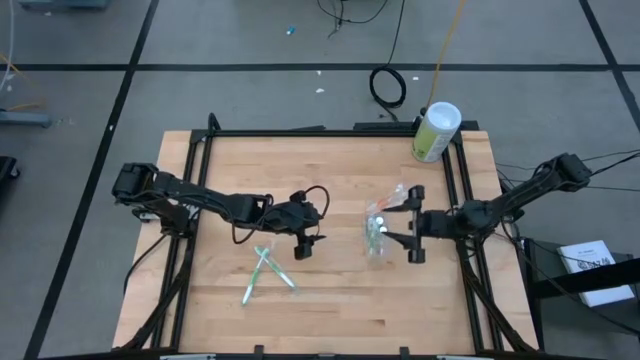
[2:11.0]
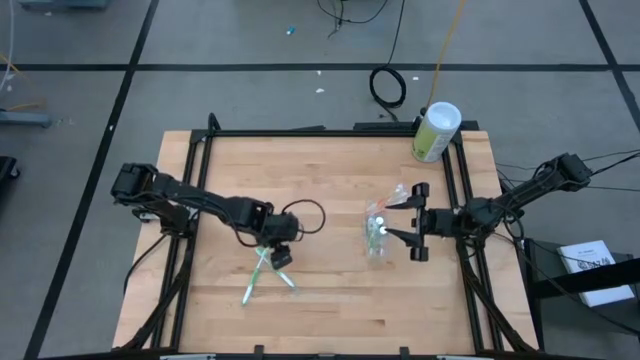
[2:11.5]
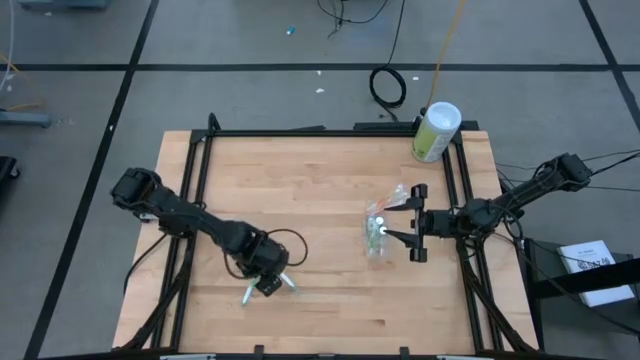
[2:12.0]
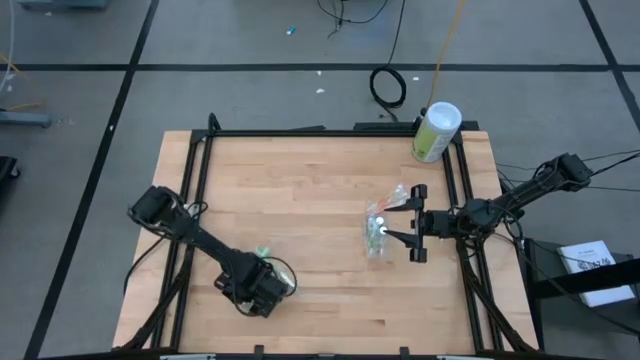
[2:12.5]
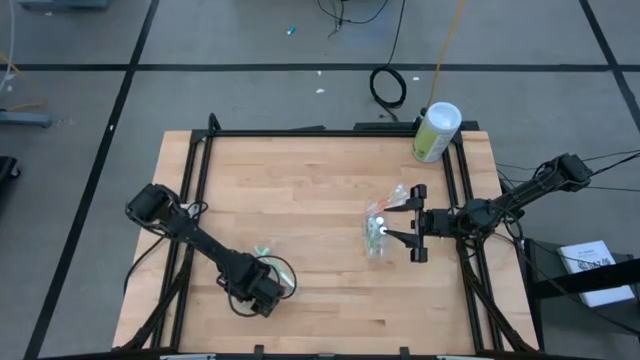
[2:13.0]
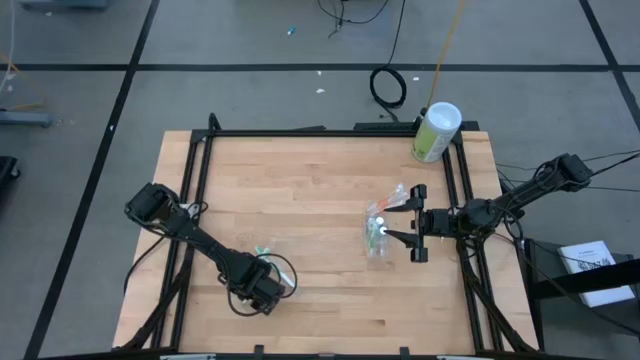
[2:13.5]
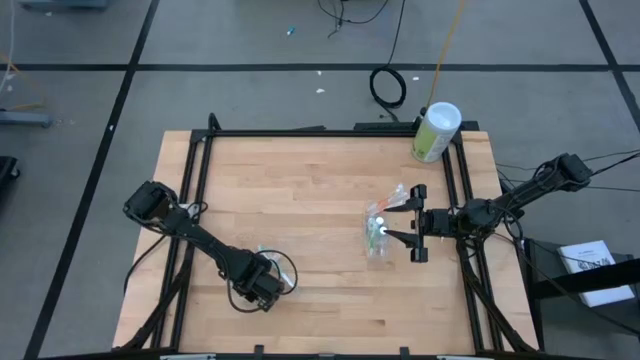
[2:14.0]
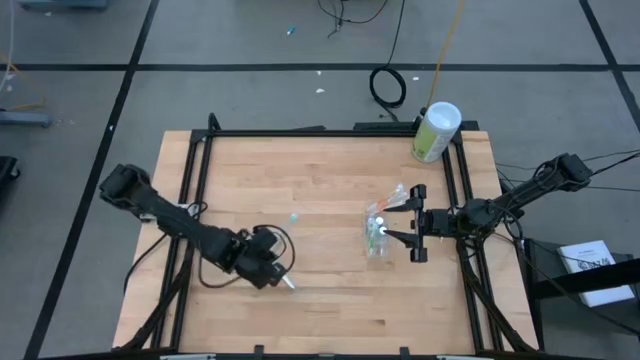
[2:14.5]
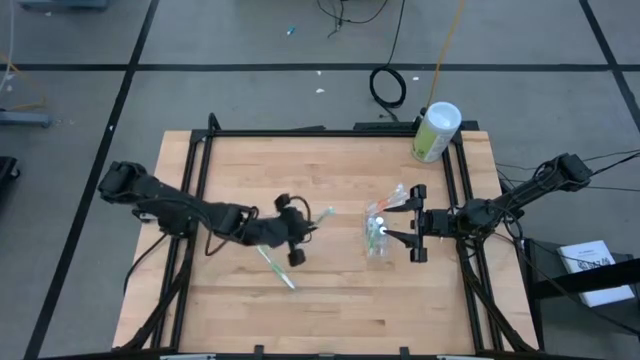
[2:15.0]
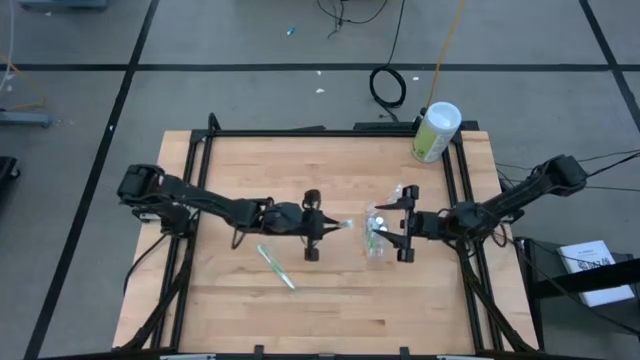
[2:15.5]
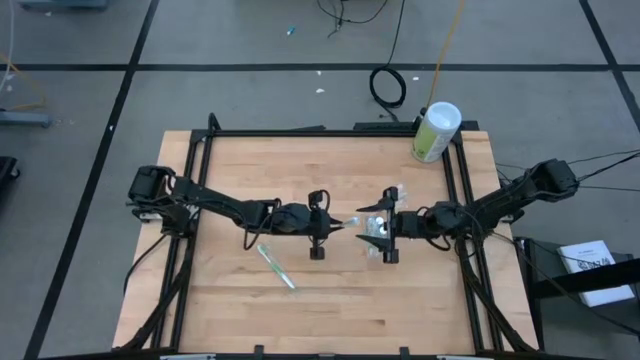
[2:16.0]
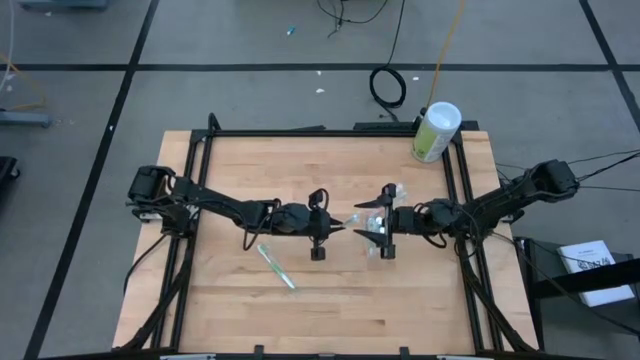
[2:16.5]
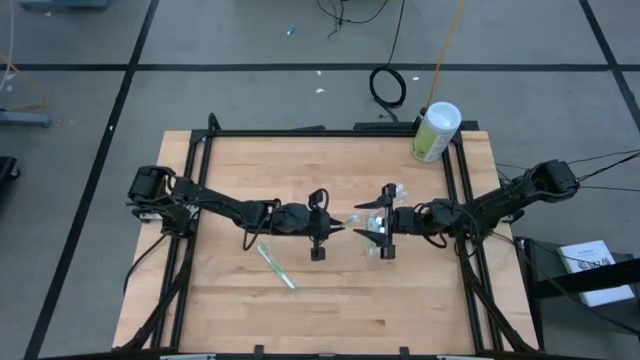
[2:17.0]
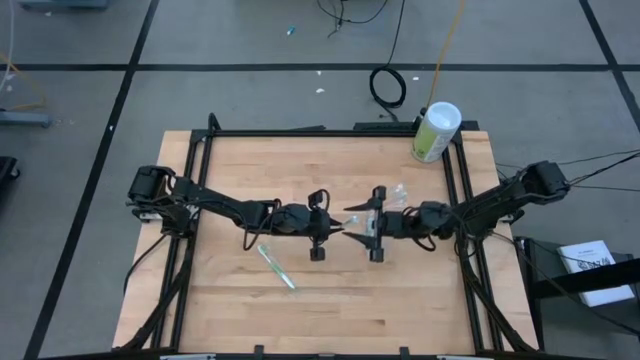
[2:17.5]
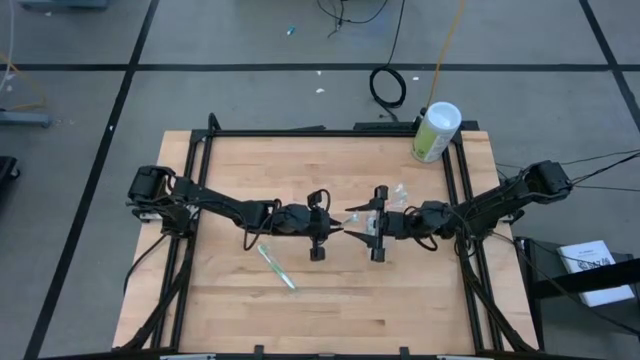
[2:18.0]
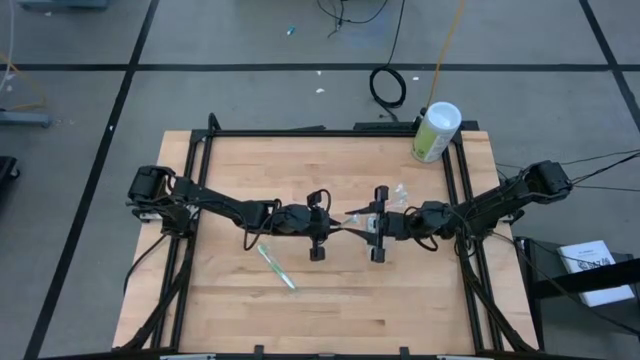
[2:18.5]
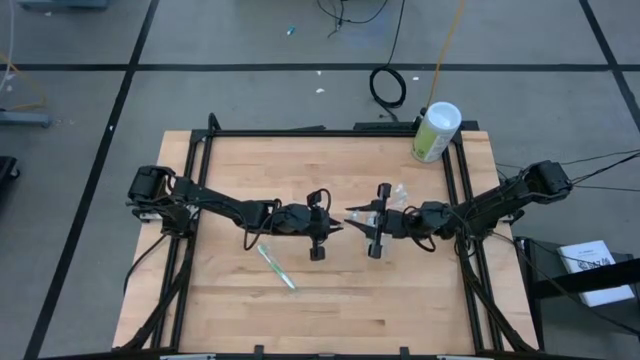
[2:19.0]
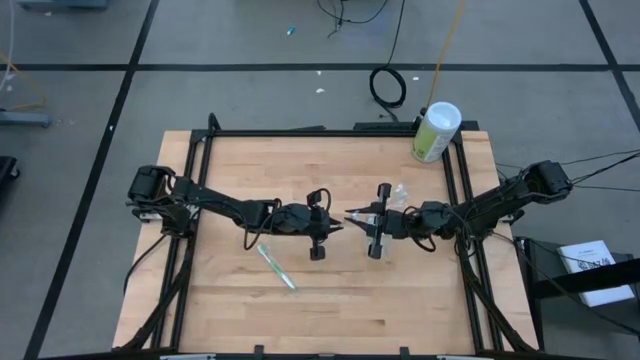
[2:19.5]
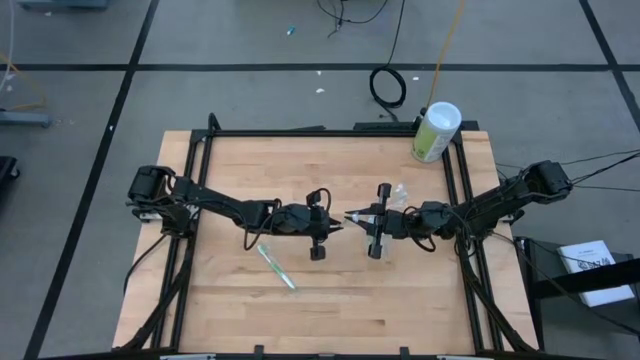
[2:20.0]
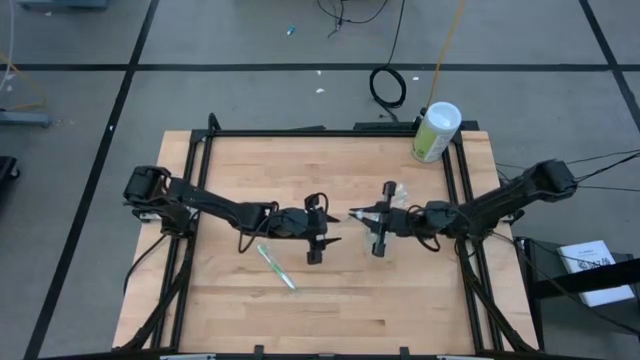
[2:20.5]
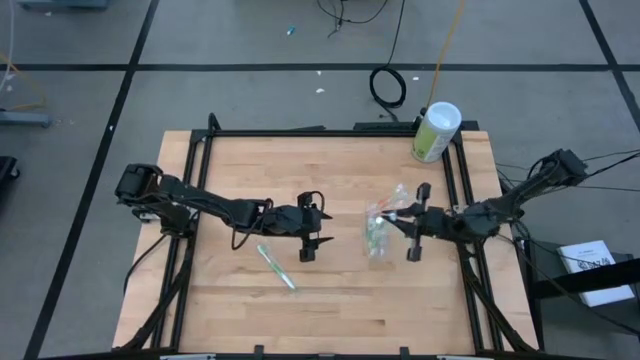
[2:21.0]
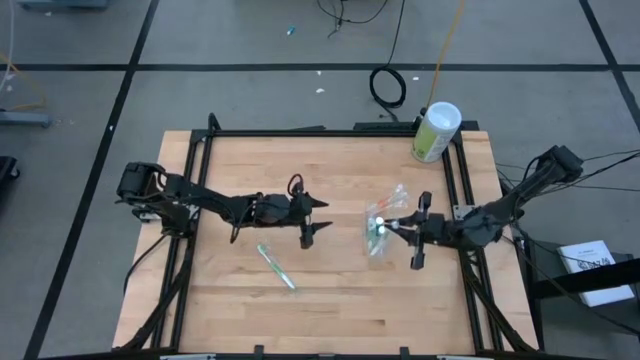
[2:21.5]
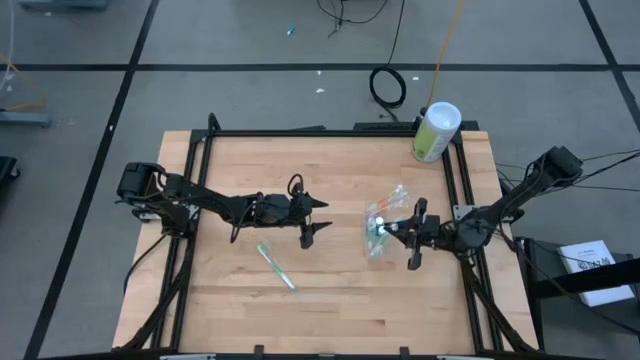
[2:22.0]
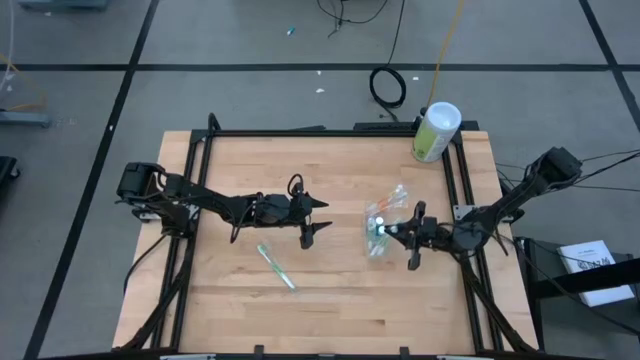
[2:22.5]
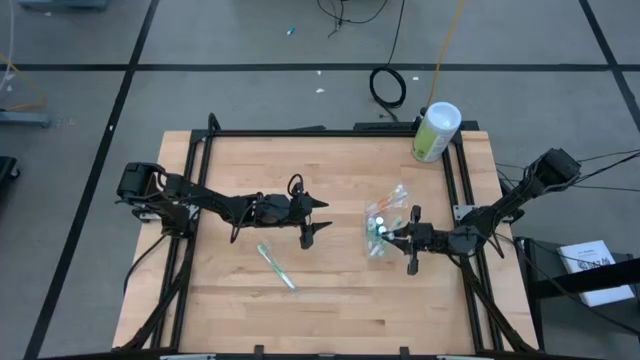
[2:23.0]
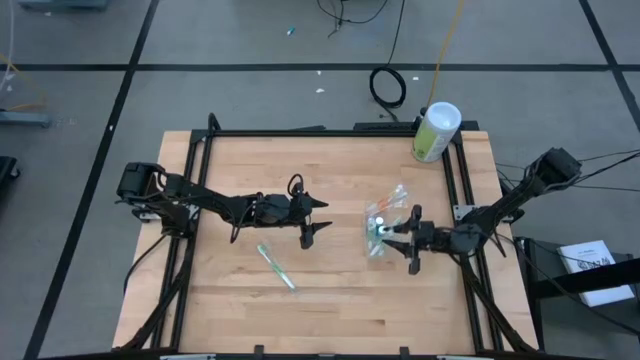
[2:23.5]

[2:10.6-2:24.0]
Task: Pick & Place toothbrushing station
Put the green toothbrush into the bottom of the transparent organizer

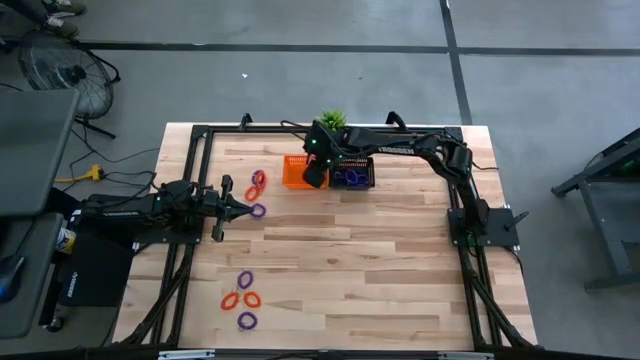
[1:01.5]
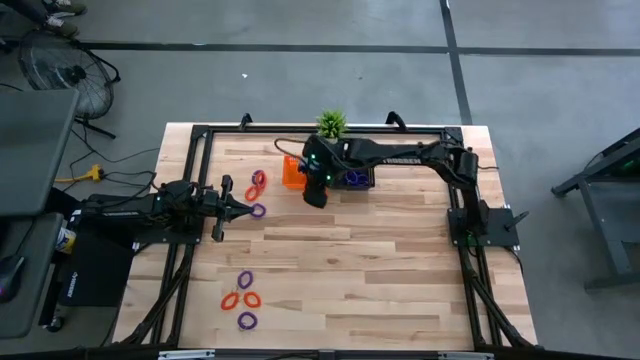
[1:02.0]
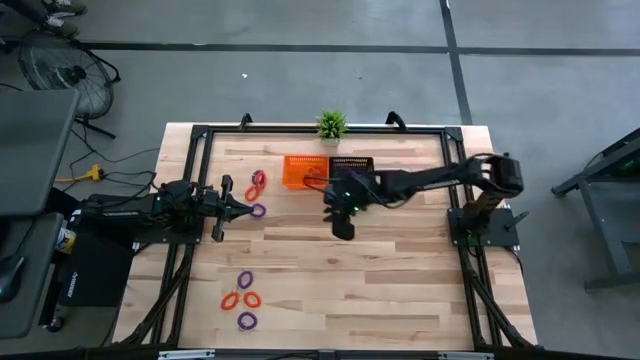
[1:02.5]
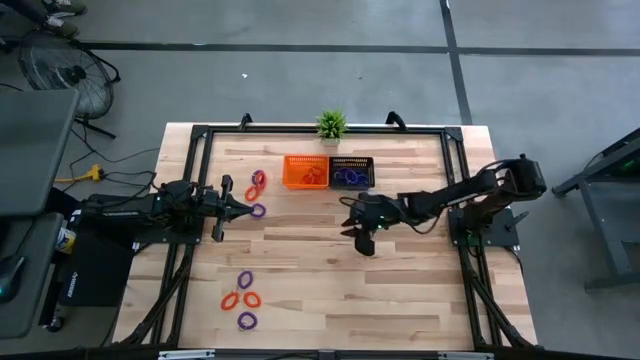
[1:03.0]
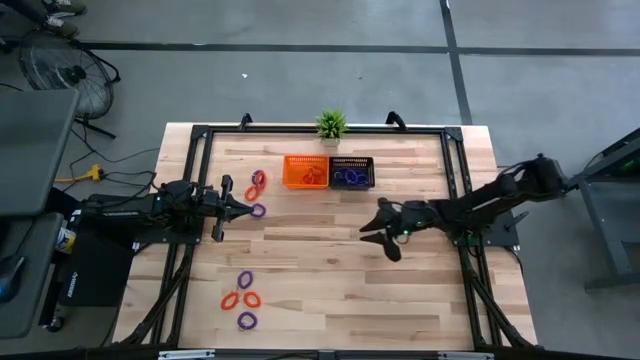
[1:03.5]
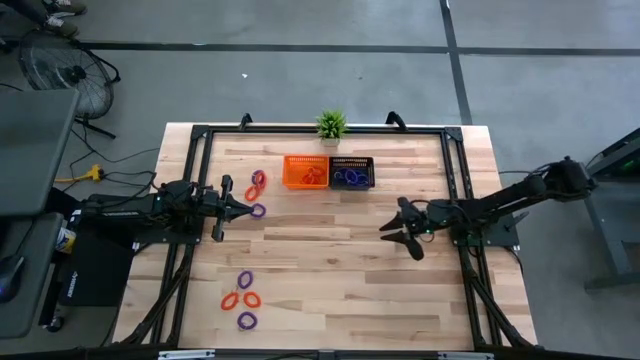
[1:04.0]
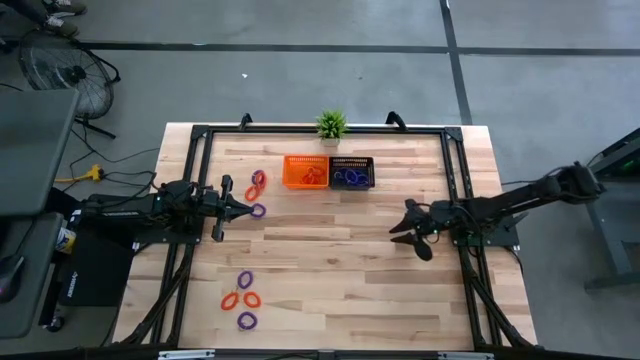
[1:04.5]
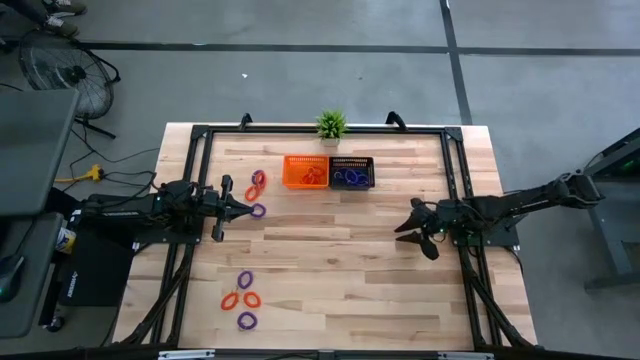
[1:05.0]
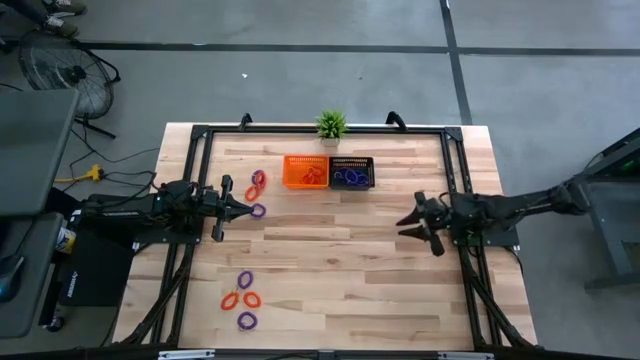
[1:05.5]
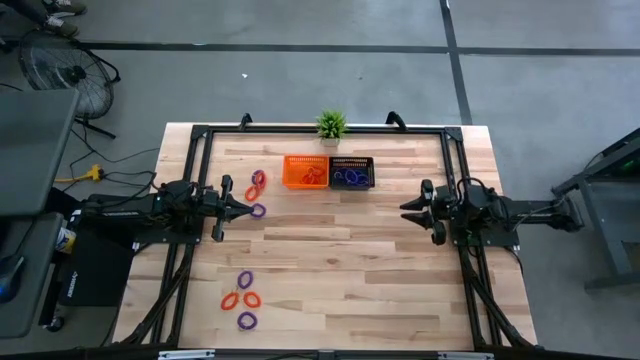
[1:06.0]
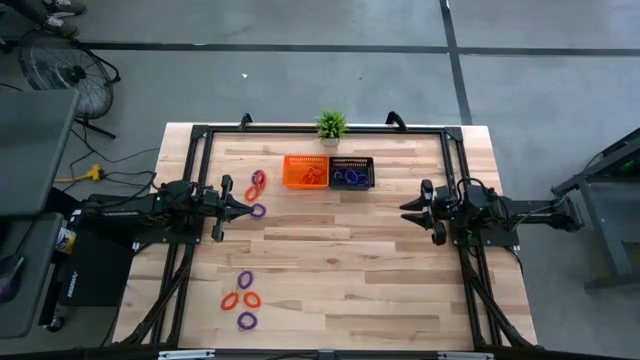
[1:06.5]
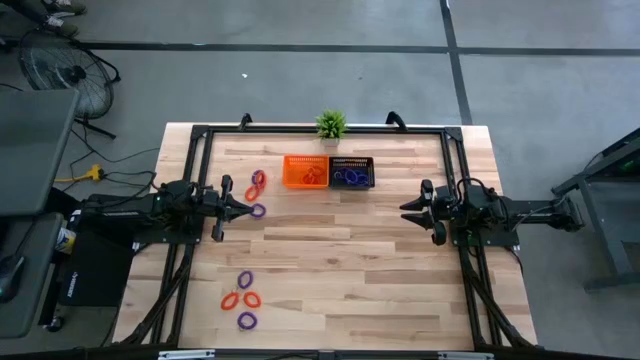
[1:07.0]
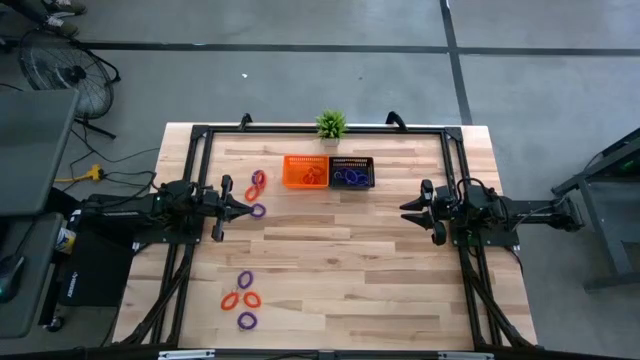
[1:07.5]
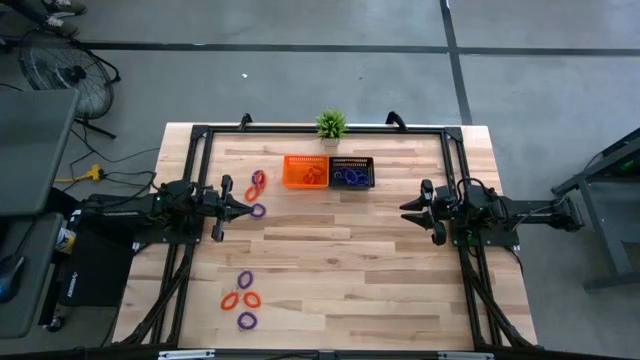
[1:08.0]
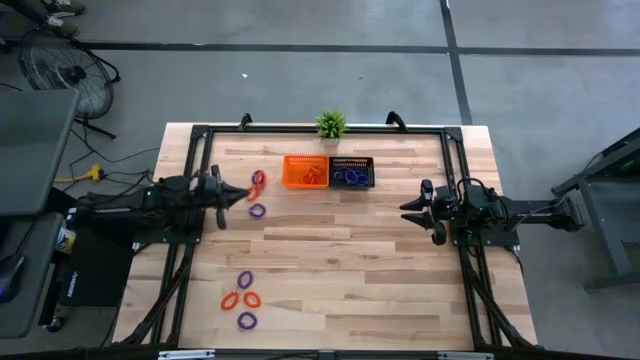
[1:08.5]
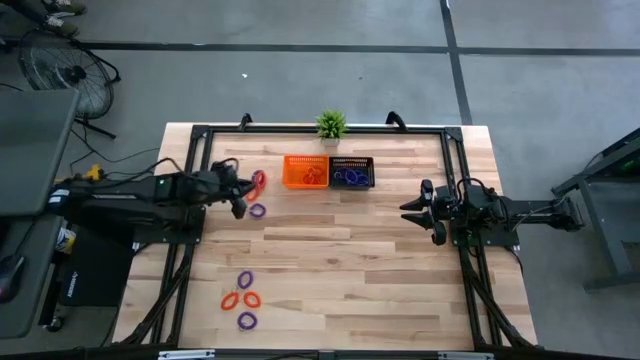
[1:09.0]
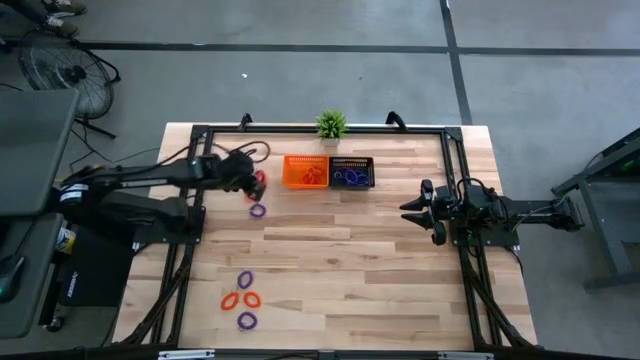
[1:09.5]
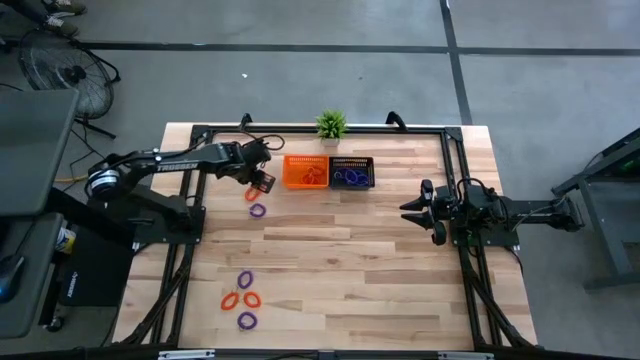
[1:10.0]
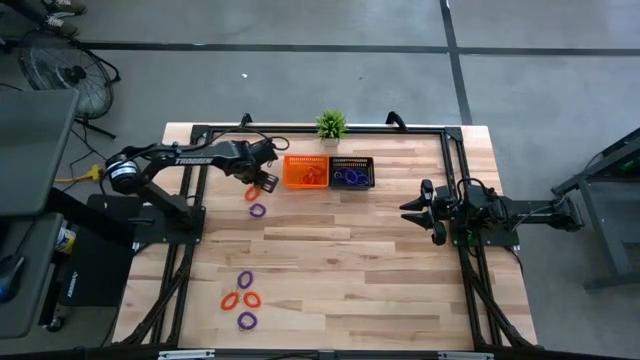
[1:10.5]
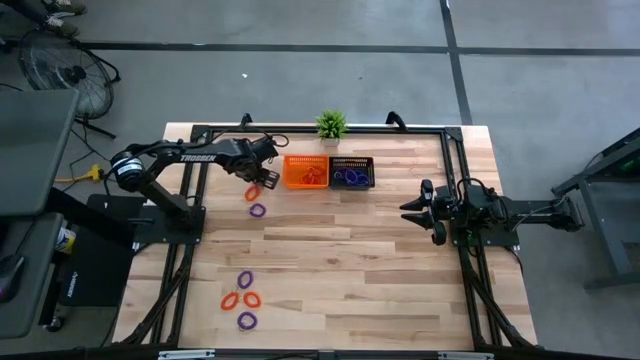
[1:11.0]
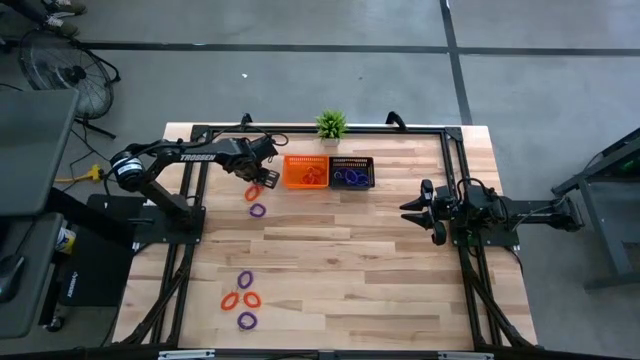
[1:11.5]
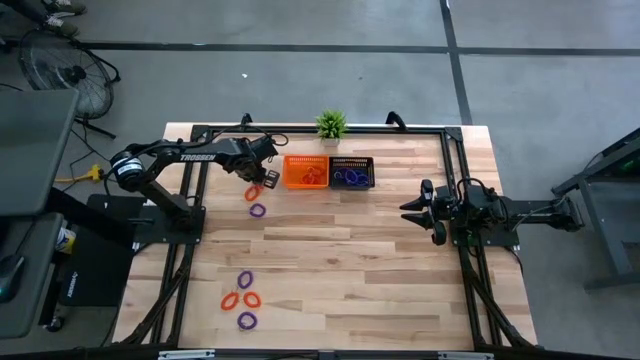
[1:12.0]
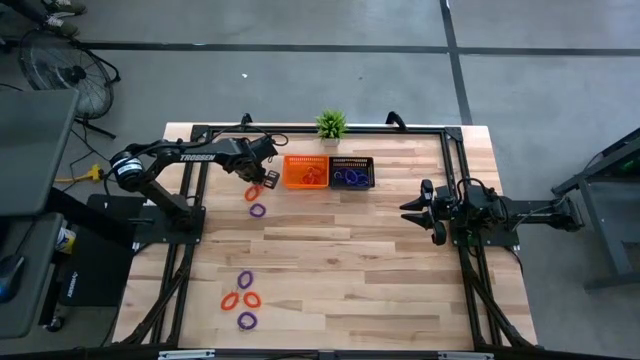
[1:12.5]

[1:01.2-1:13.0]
Task: Sort spring keychains into baskets
Put the orange spring keychain into the orange basket
